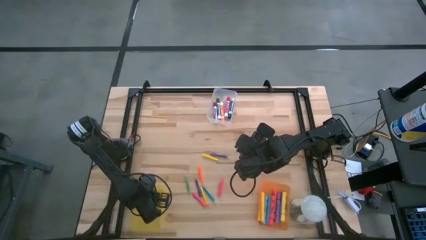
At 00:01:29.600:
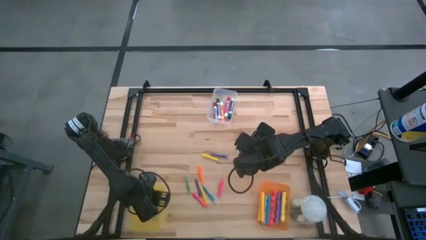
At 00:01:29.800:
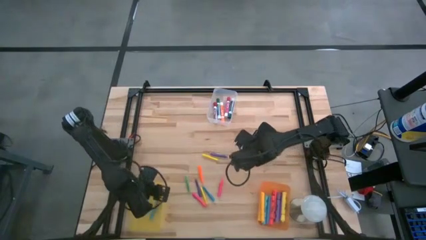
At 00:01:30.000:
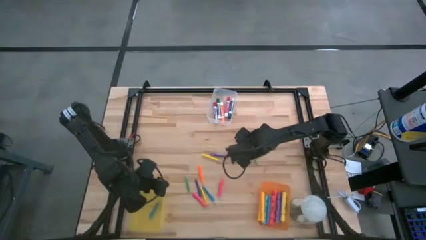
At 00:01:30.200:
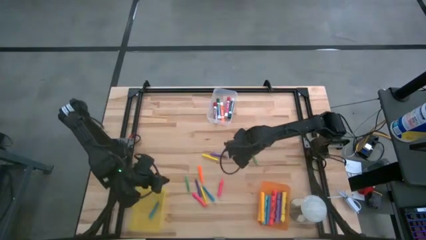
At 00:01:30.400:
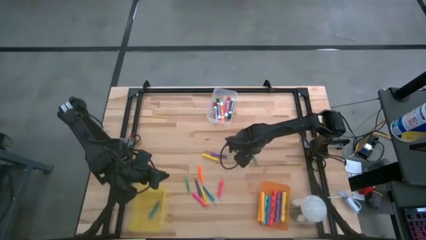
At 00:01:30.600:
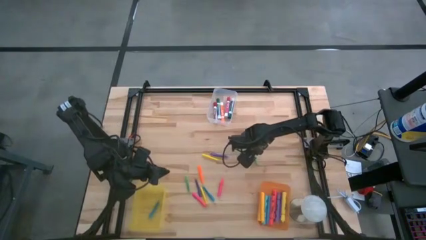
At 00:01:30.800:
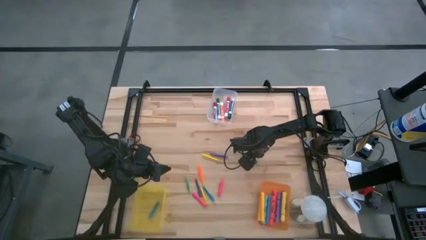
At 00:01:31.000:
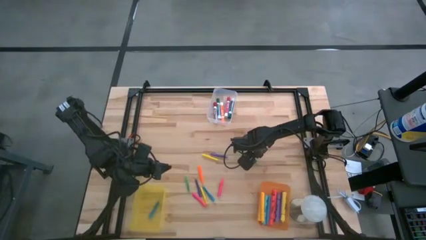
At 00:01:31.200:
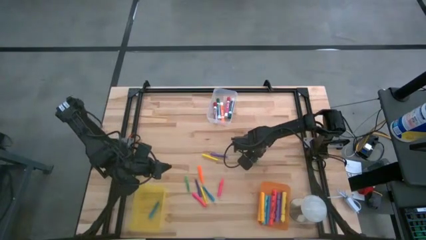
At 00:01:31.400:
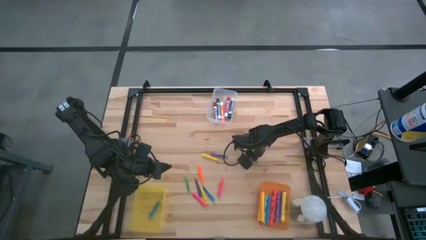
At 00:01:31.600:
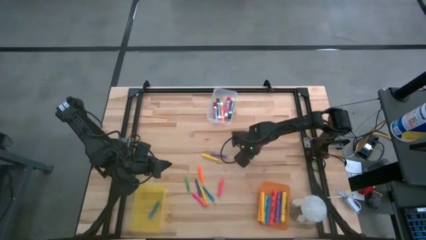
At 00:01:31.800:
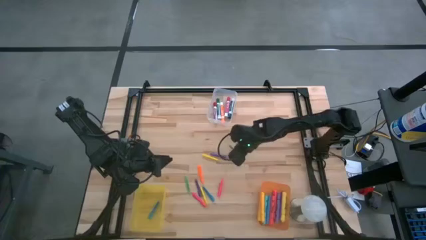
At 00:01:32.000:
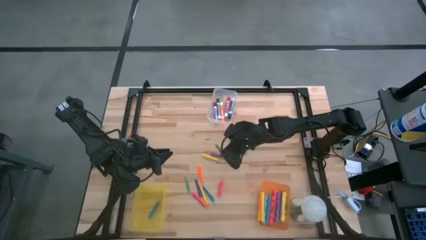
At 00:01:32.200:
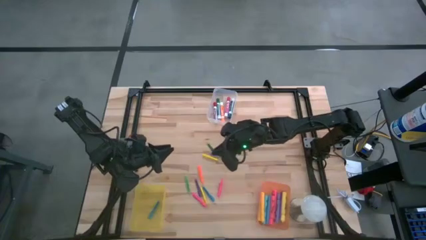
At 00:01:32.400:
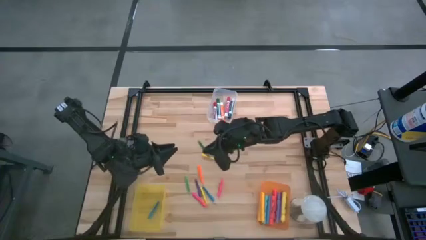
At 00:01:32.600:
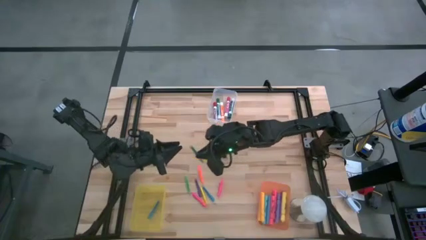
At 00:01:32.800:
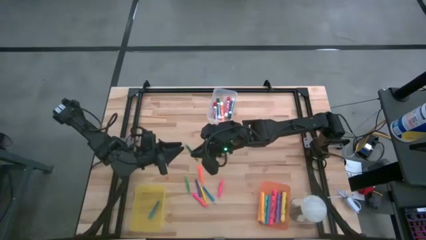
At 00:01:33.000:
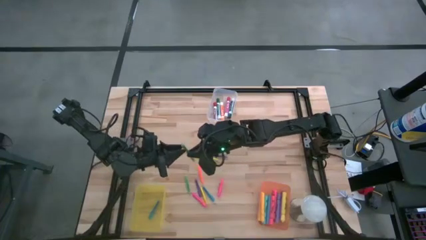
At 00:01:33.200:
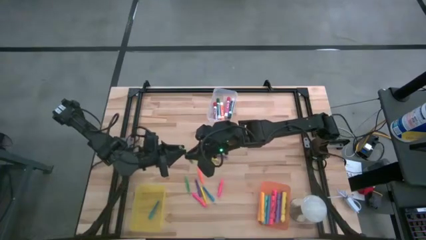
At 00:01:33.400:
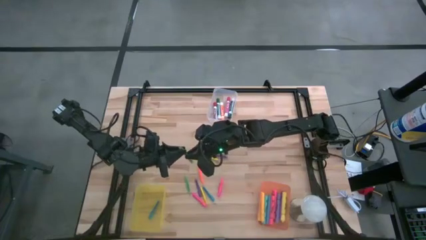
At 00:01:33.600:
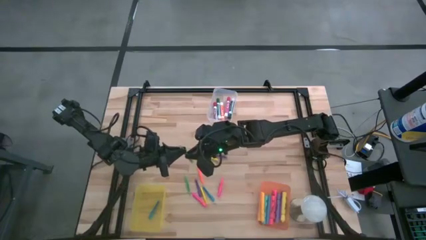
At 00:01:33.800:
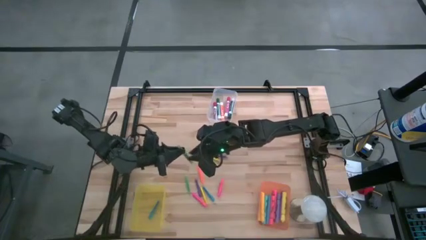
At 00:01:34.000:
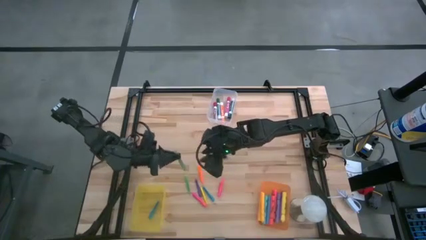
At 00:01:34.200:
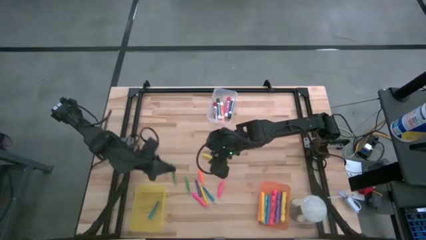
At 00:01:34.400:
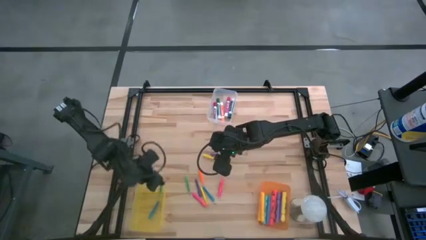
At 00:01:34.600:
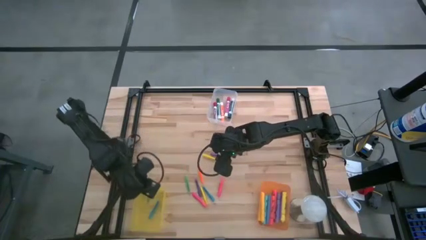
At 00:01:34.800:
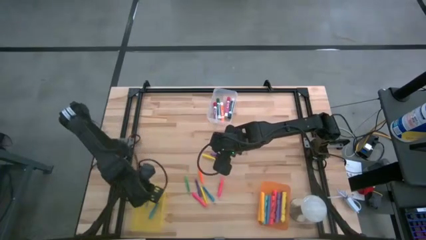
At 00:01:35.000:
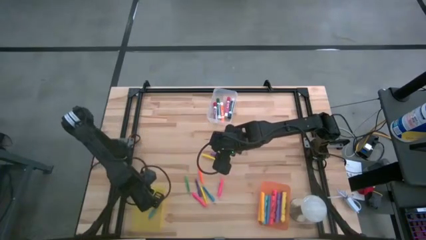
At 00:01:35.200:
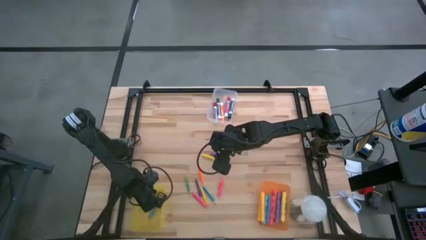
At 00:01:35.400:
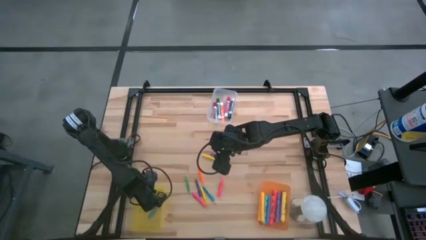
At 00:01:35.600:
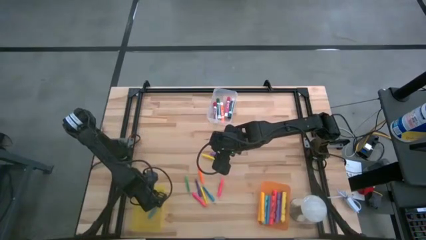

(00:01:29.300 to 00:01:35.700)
Task: Pick & Place Markers
Put the top green highlighter into the yellow bin

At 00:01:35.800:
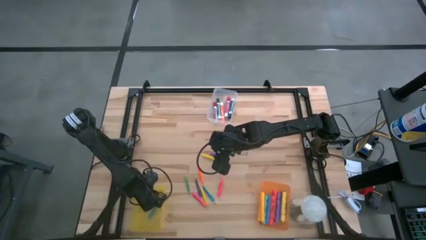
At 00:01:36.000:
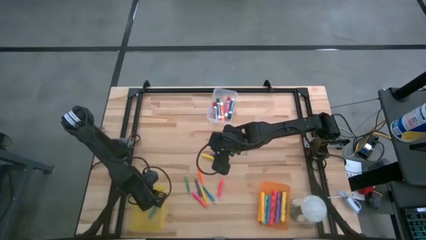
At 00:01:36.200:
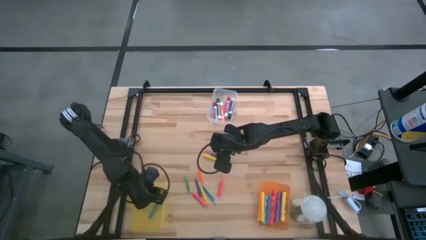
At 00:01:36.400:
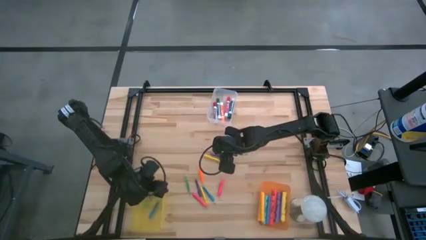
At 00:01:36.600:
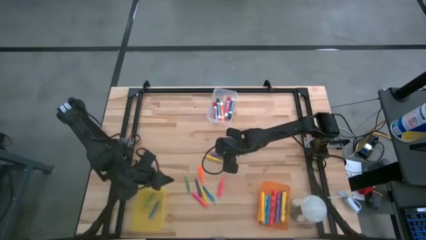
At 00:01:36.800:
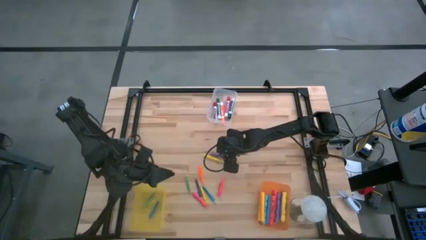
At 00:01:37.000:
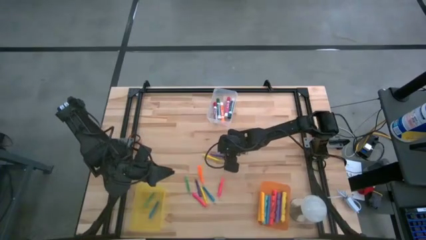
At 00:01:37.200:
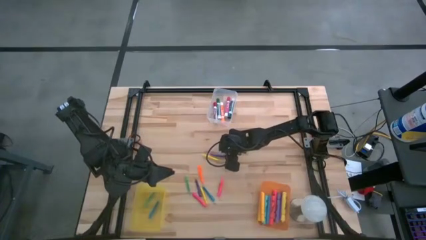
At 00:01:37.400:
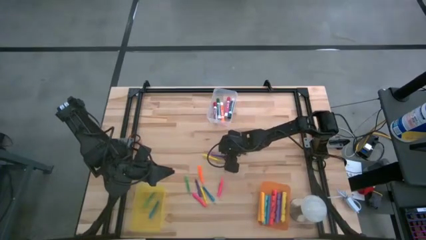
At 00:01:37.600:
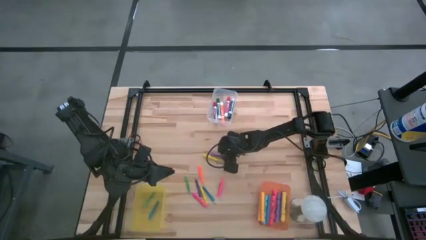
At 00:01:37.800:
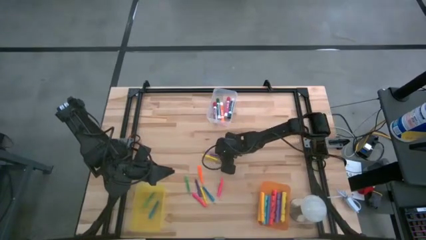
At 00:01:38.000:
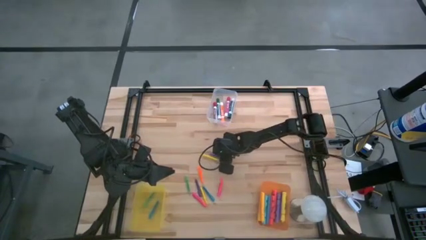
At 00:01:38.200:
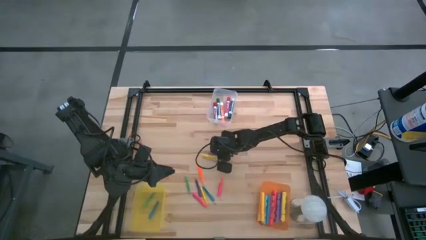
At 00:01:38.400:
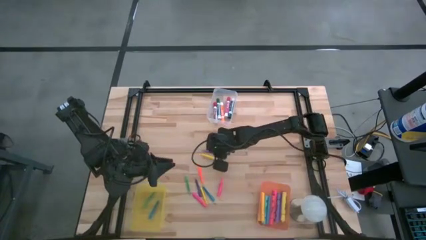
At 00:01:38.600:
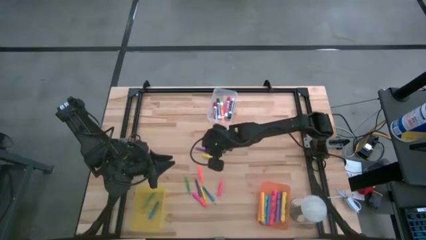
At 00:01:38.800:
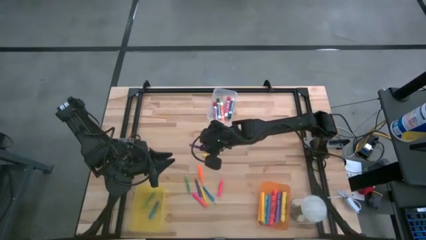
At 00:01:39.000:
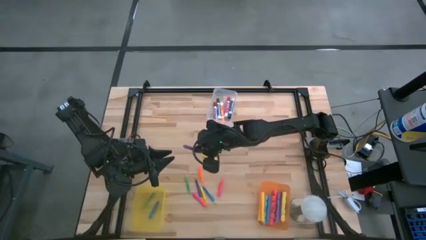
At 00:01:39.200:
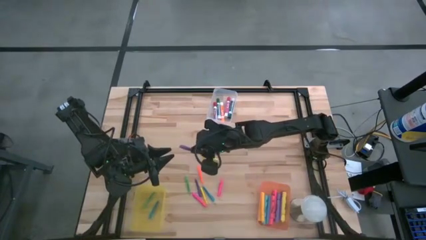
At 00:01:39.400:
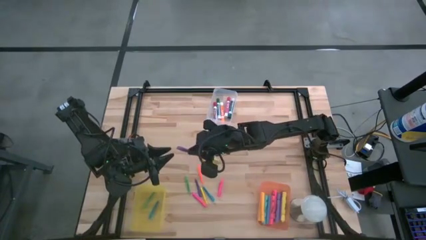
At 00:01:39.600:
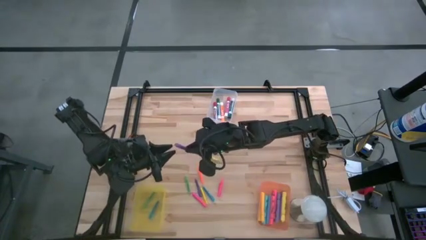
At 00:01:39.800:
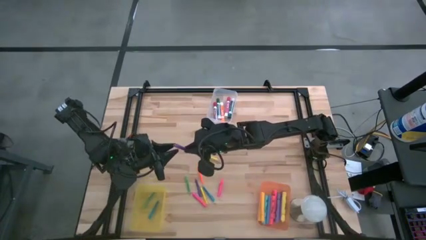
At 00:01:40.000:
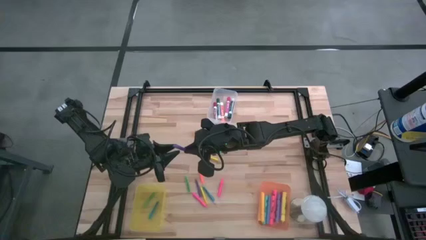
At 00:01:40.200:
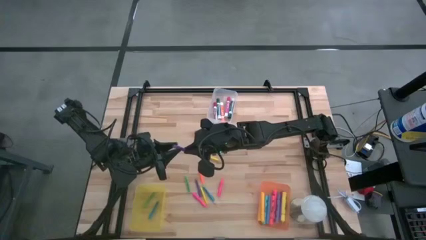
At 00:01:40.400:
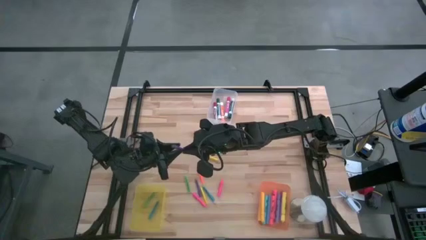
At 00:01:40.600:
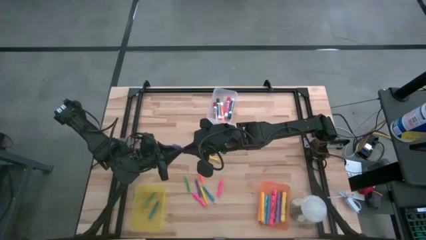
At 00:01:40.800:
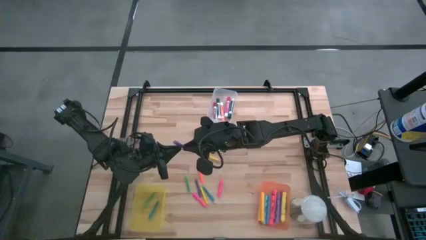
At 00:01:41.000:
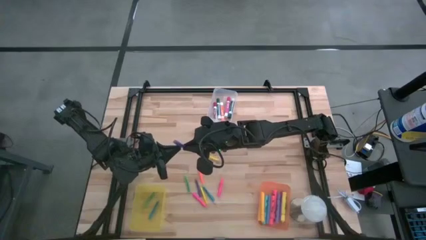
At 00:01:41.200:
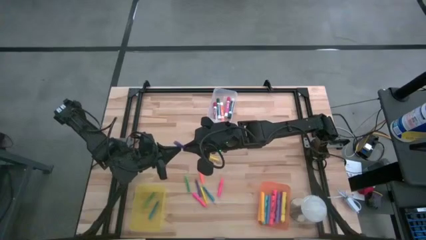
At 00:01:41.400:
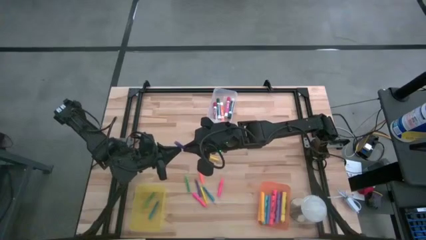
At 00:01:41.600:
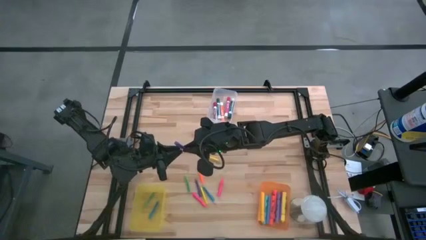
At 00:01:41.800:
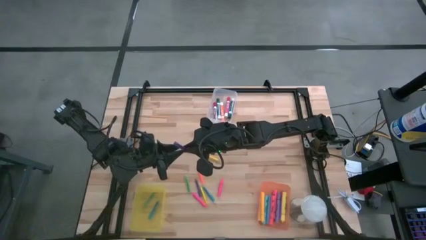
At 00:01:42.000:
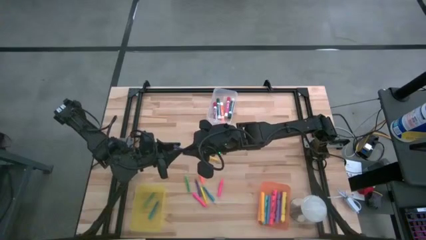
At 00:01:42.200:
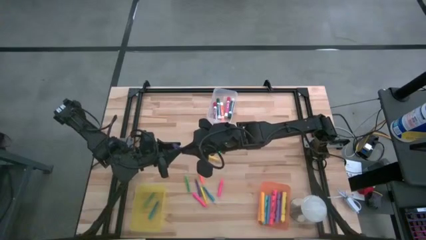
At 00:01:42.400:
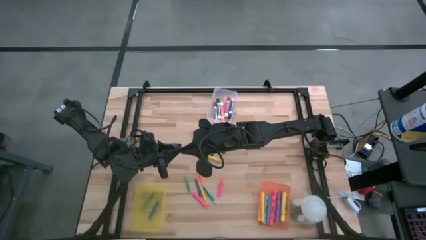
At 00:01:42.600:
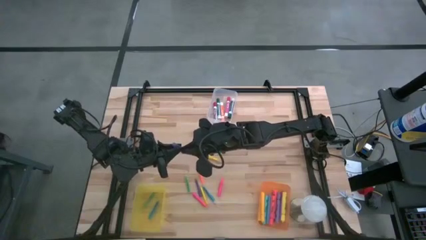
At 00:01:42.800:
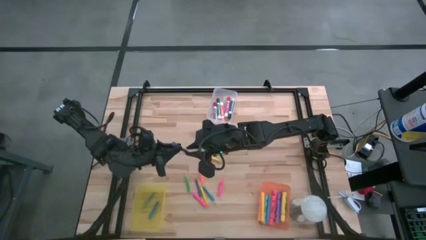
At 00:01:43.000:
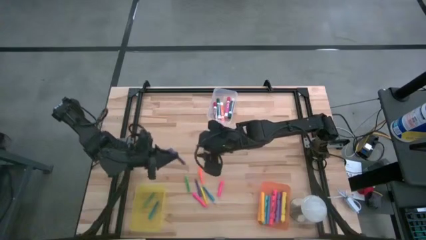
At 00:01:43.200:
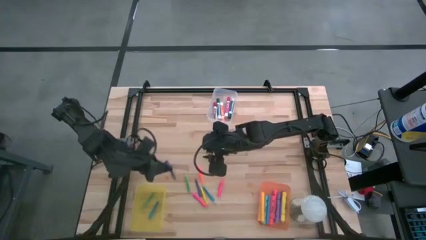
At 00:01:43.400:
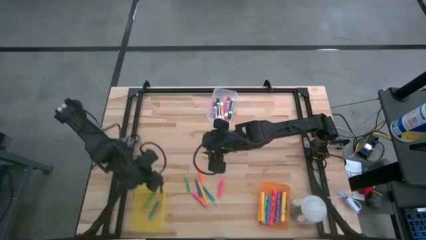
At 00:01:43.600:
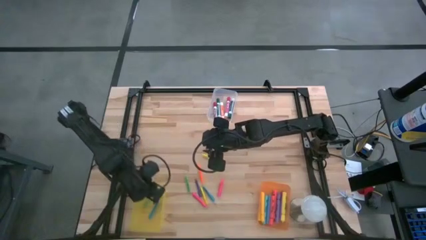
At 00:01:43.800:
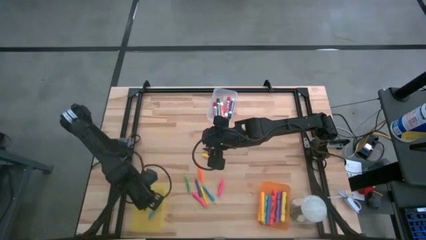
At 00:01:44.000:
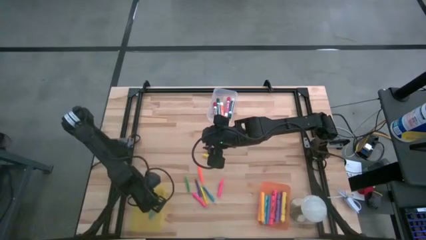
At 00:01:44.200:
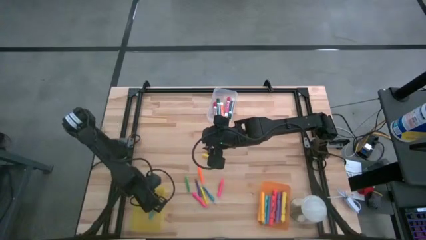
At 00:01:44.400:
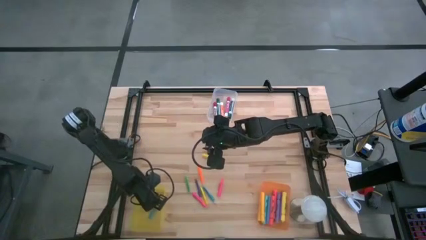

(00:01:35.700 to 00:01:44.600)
Put the top violet highlighter into the yellow bin
